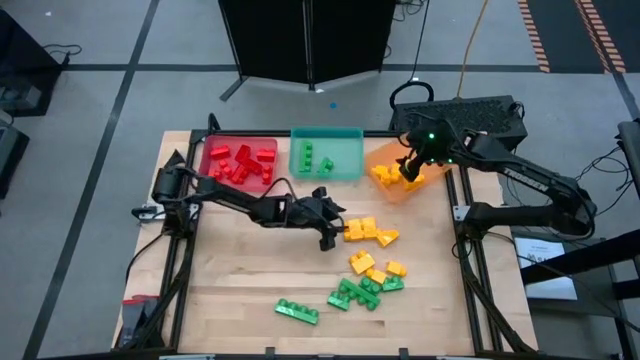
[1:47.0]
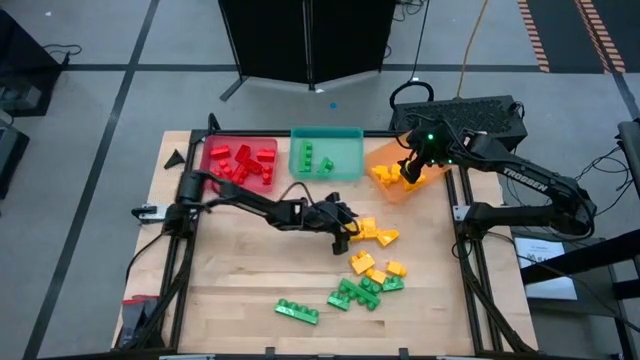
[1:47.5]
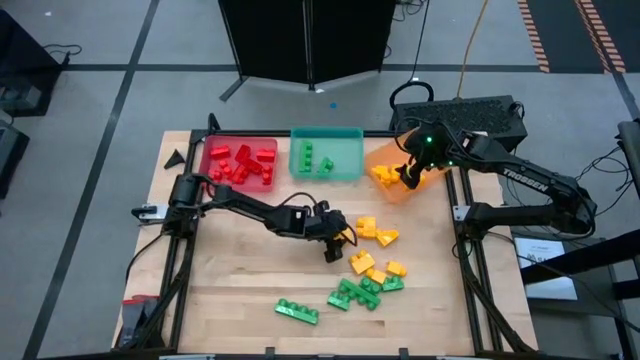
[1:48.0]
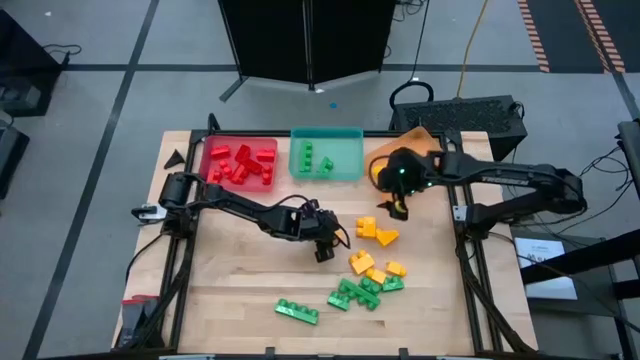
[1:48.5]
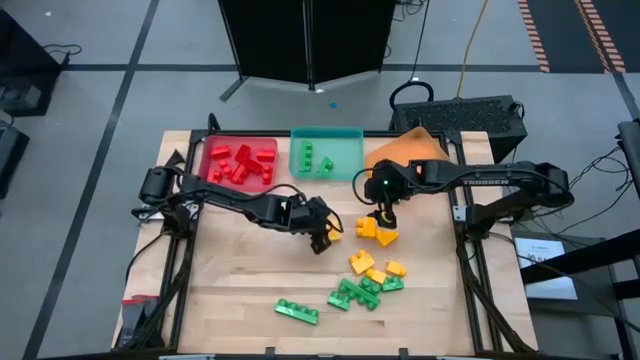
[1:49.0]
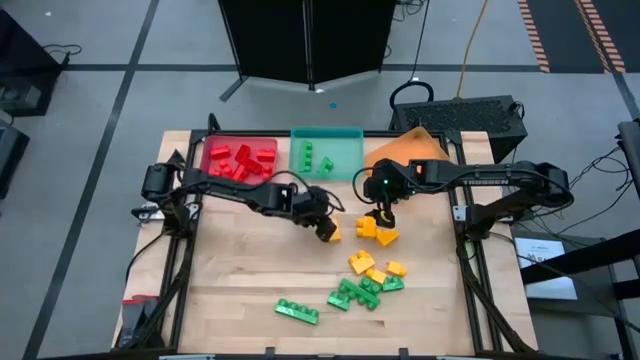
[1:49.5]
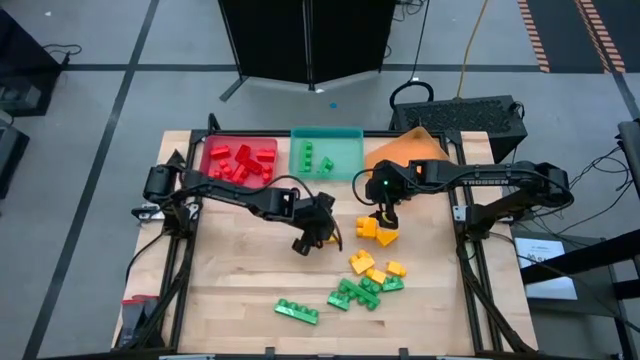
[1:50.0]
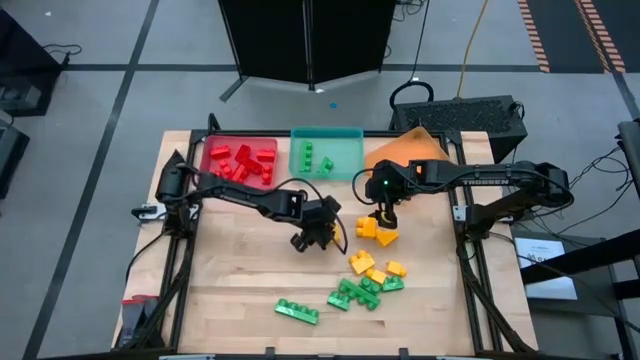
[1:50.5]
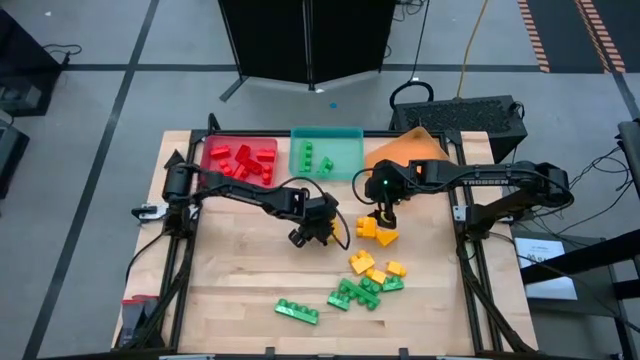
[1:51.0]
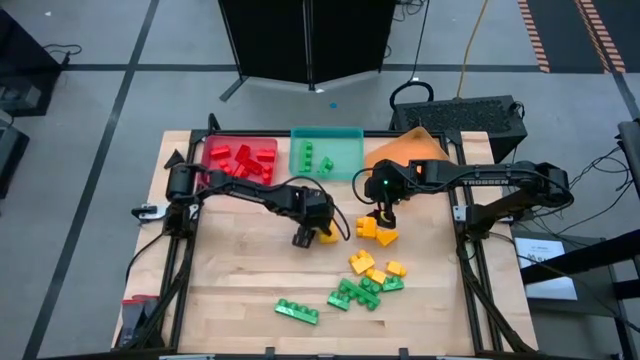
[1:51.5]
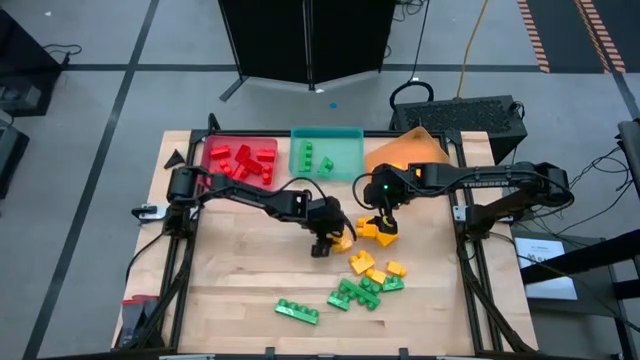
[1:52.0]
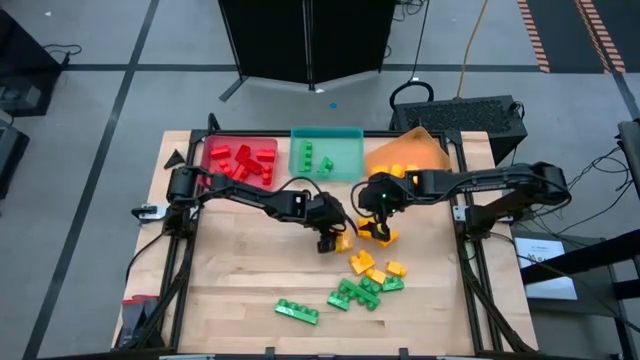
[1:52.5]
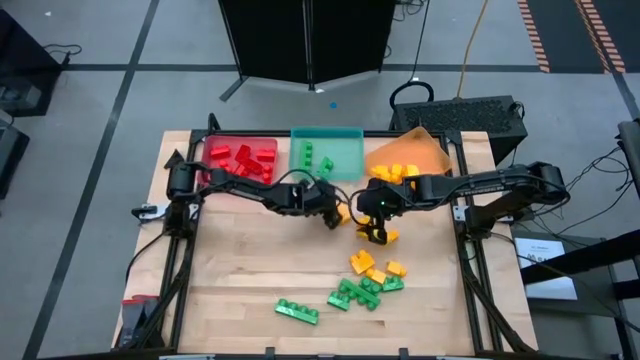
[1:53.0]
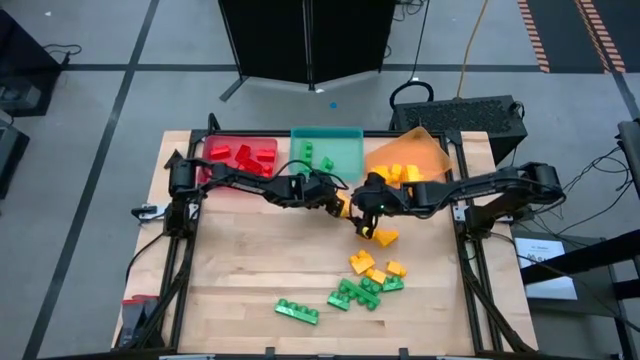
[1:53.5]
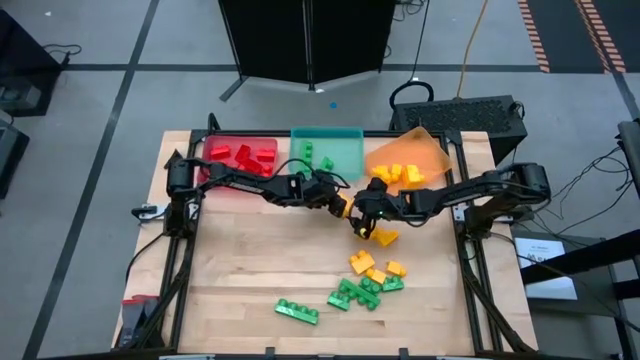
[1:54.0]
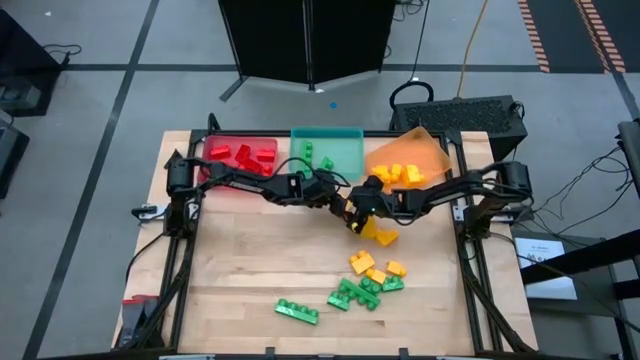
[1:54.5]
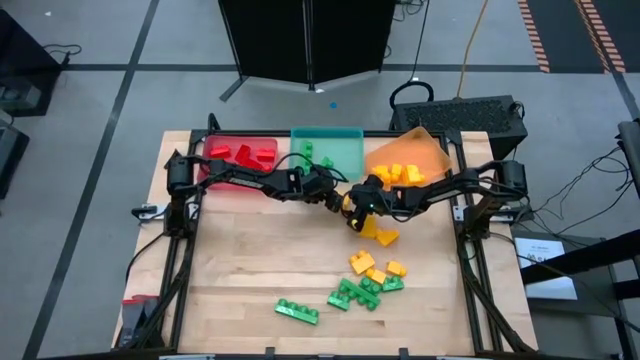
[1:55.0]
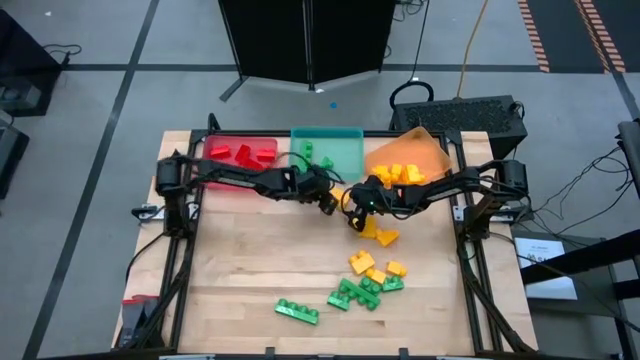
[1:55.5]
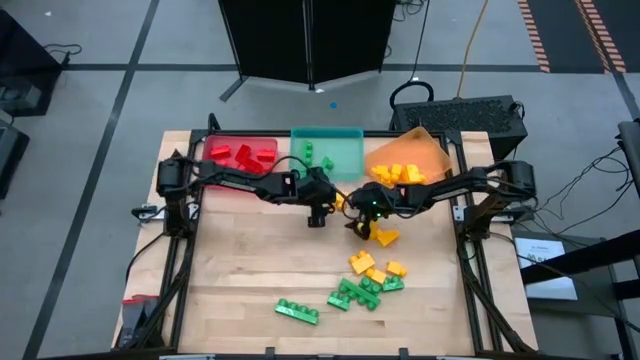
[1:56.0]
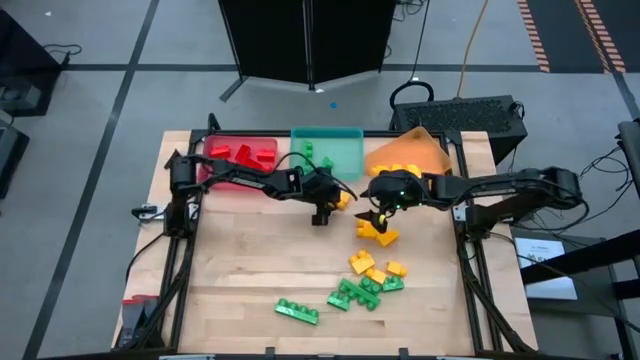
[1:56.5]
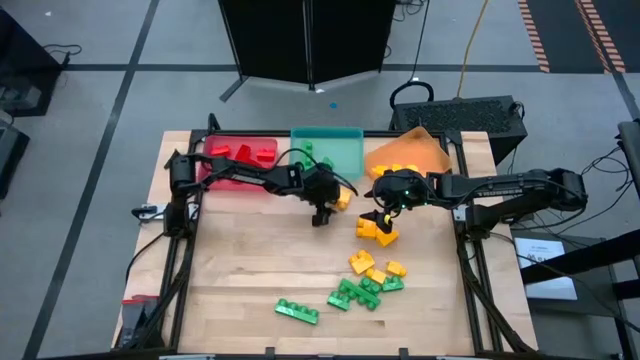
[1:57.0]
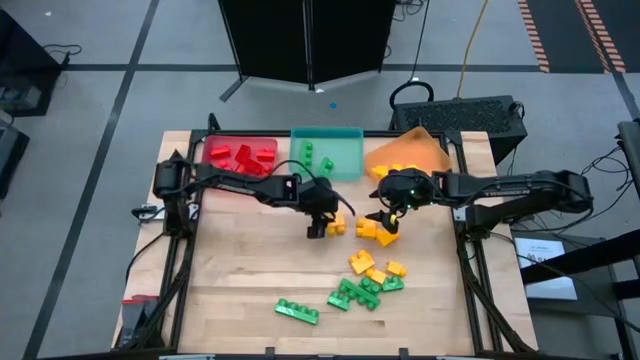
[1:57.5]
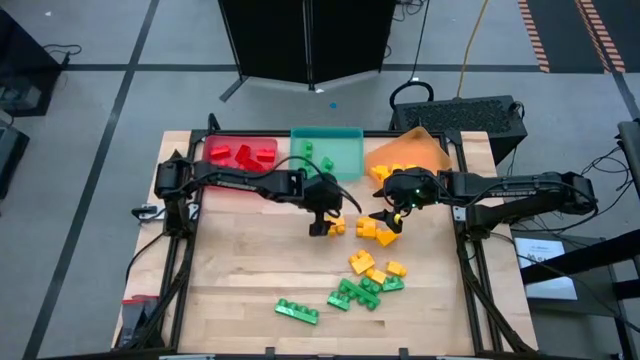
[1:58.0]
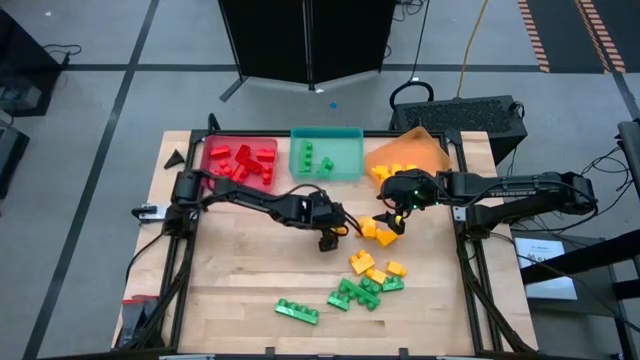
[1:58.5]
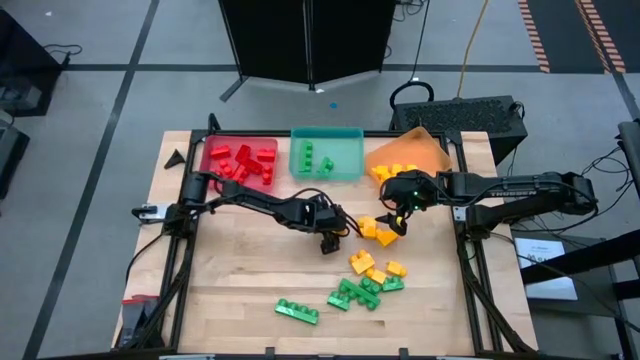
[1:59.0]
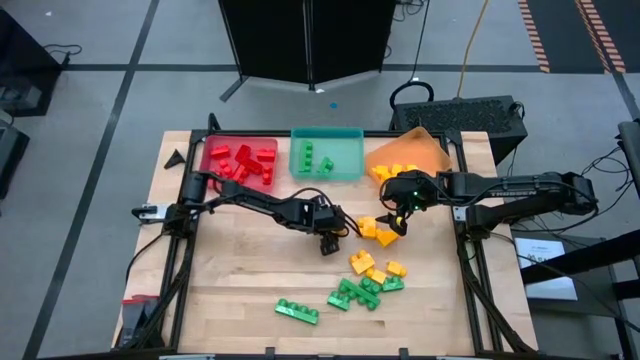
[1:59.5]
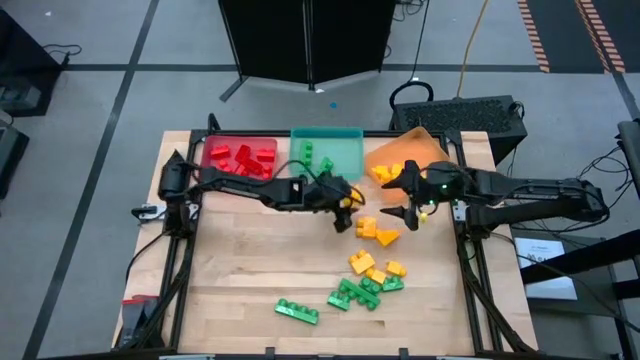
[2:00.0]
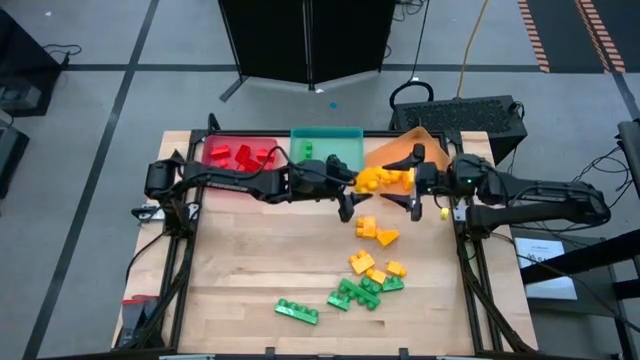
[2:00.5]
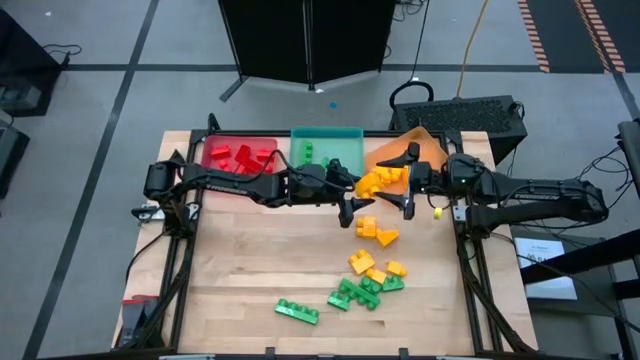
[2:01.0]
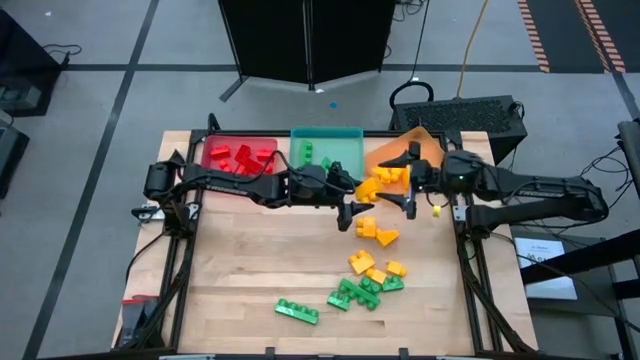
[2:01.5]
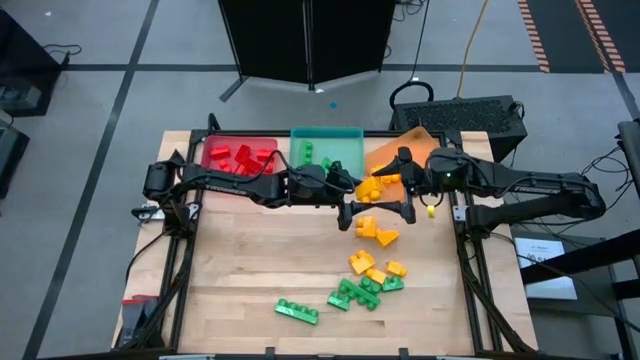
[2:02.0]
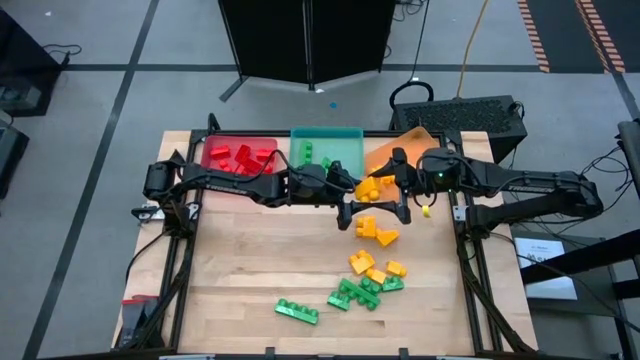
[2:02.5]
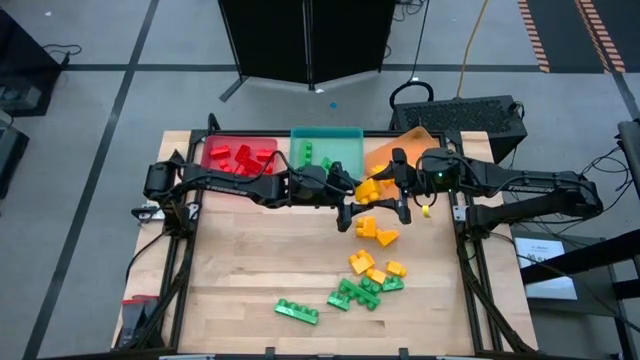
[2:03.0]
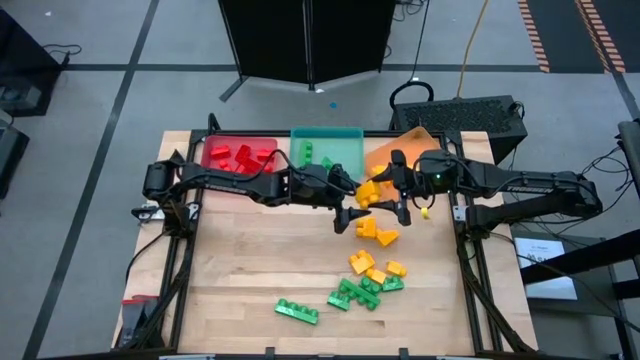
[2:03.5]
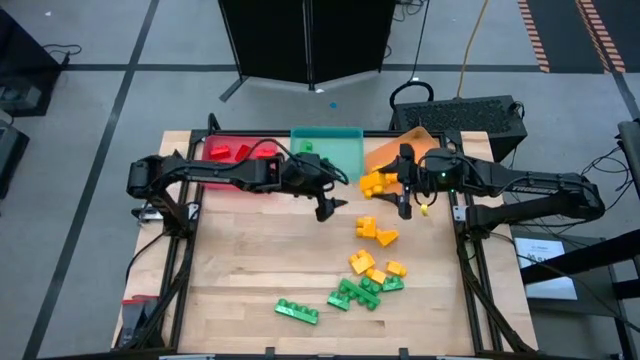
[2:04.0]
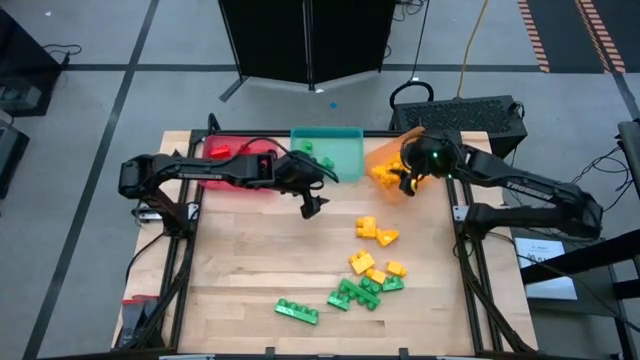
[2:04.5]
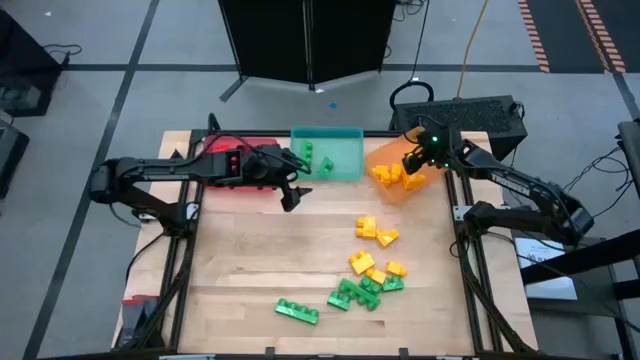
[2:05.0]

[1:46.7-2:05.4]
Task: Sort blocks
Put the yellow game piece into the orange bin

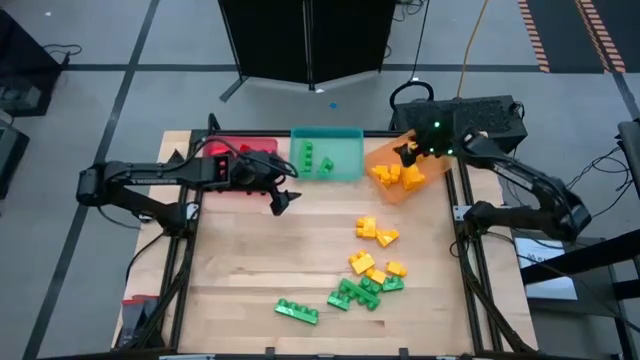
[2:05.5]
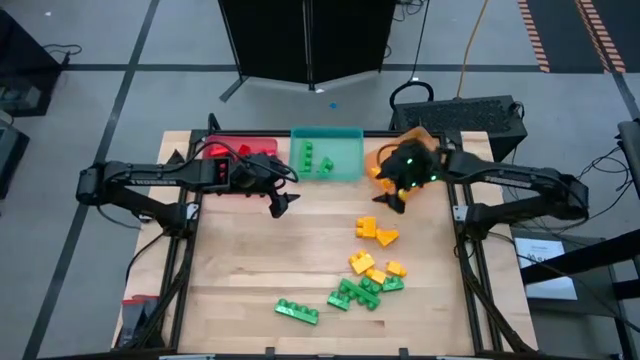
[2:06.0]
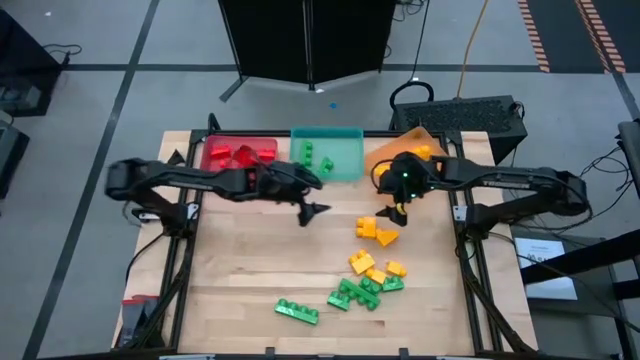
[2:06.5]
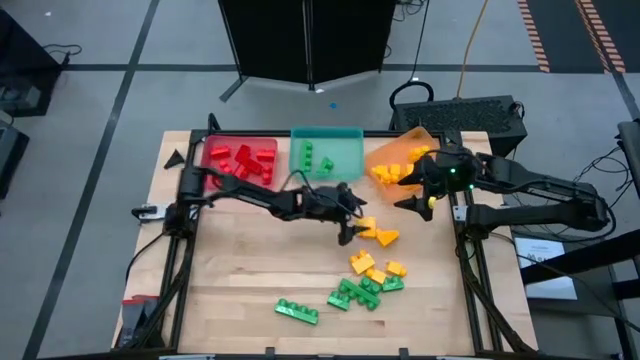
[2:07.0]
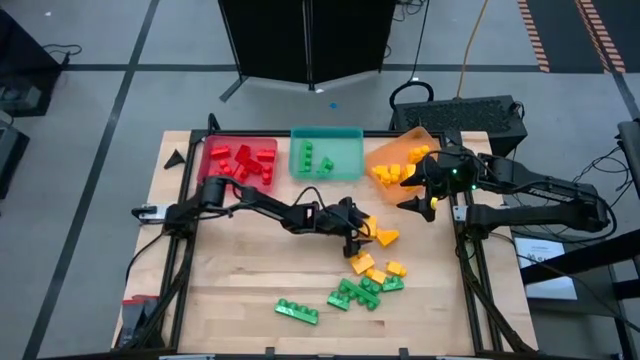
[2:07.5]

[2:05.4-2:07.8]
Put the yellow game piece into the orange bin
